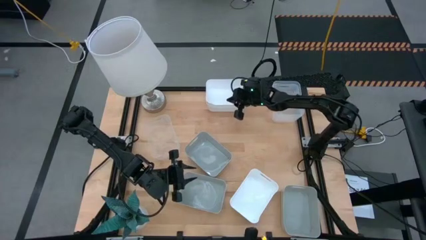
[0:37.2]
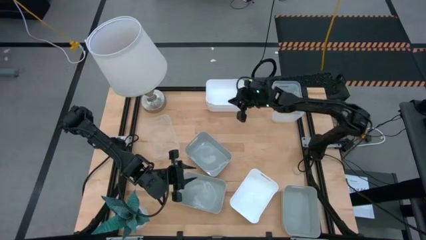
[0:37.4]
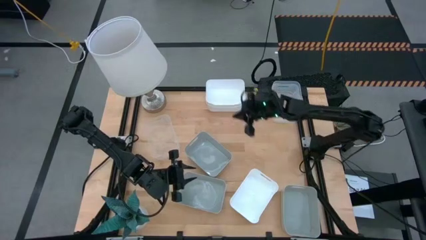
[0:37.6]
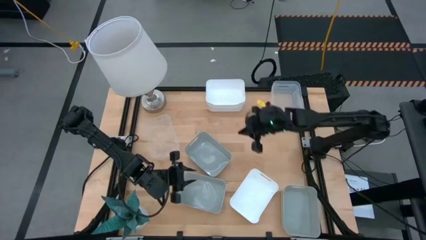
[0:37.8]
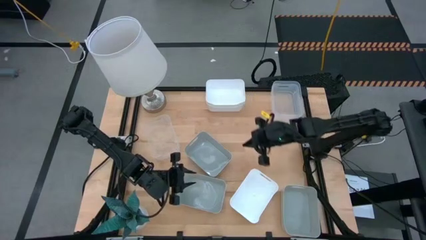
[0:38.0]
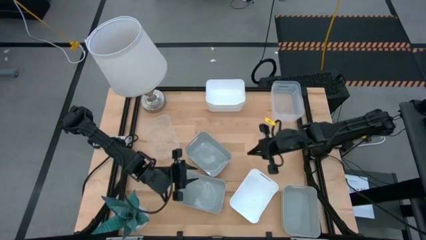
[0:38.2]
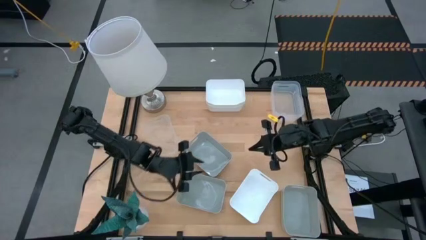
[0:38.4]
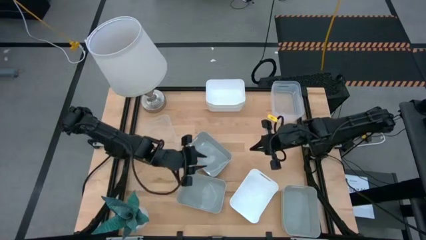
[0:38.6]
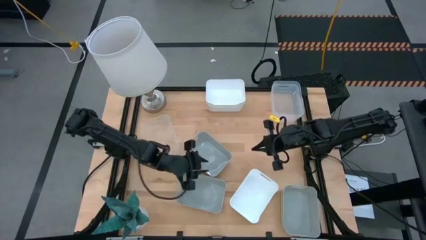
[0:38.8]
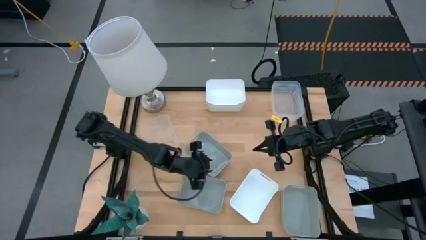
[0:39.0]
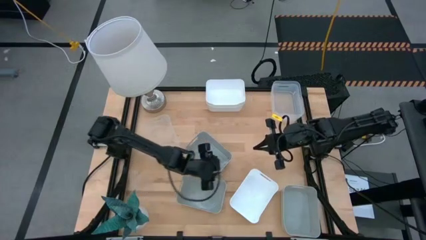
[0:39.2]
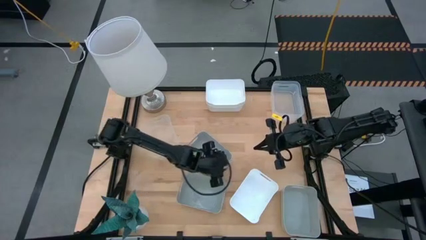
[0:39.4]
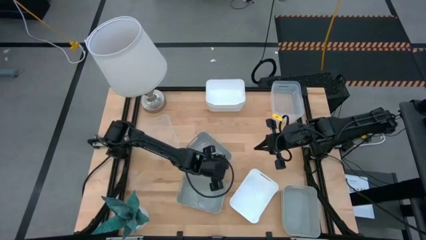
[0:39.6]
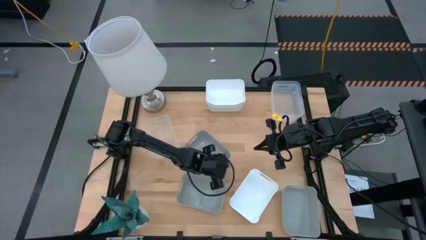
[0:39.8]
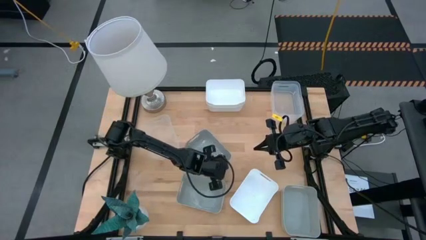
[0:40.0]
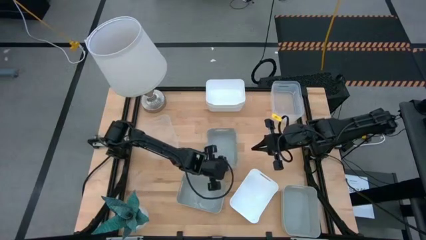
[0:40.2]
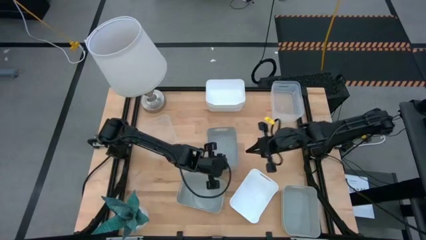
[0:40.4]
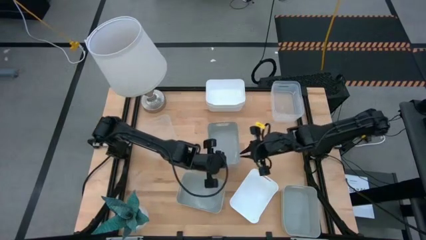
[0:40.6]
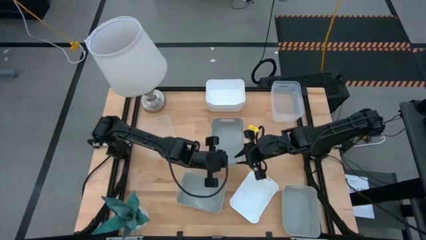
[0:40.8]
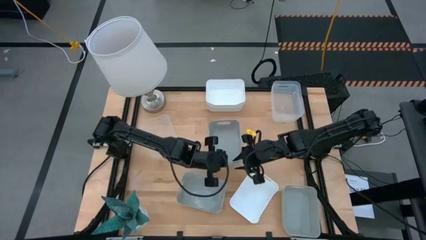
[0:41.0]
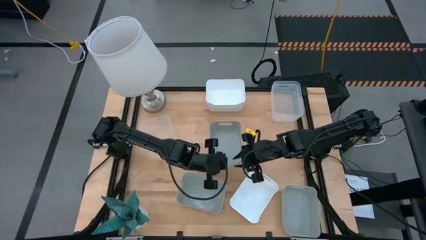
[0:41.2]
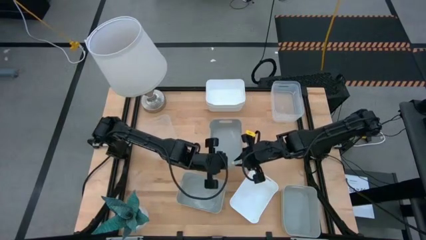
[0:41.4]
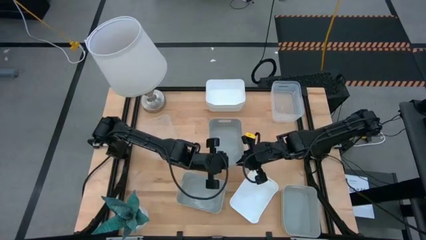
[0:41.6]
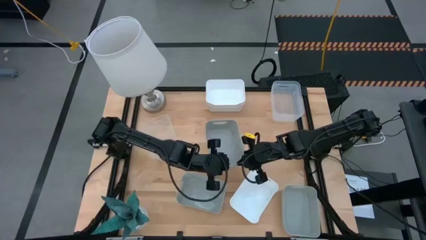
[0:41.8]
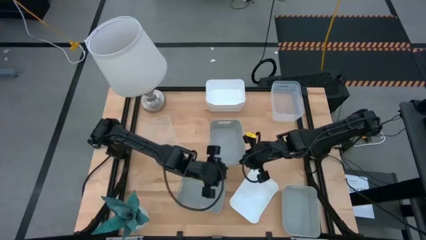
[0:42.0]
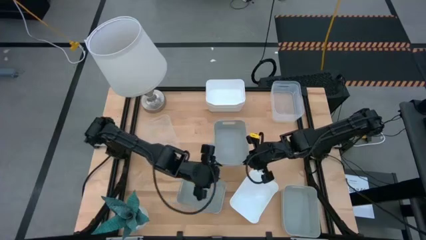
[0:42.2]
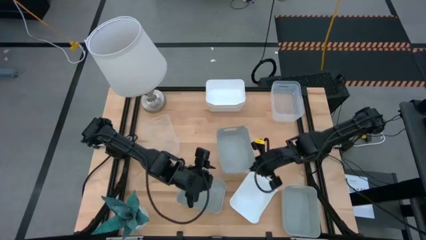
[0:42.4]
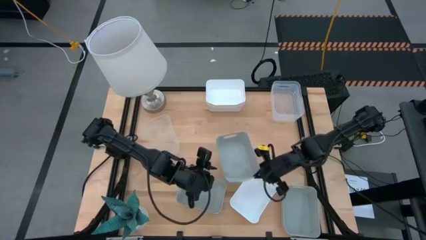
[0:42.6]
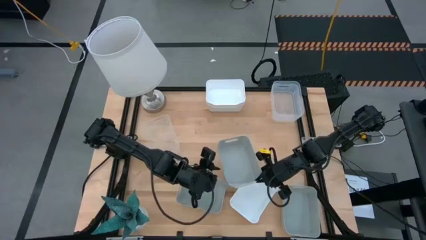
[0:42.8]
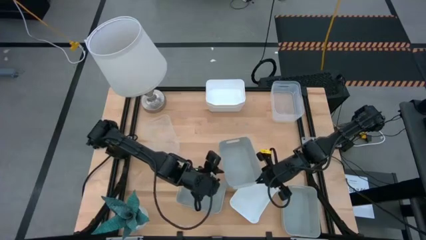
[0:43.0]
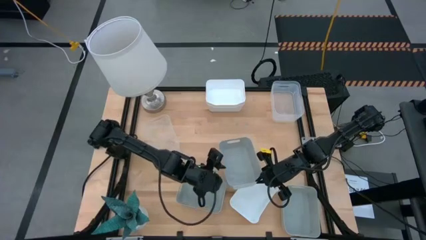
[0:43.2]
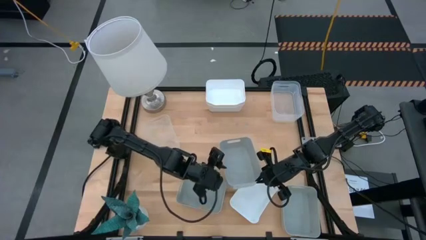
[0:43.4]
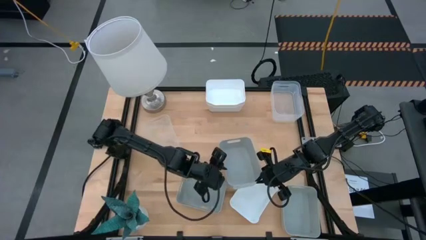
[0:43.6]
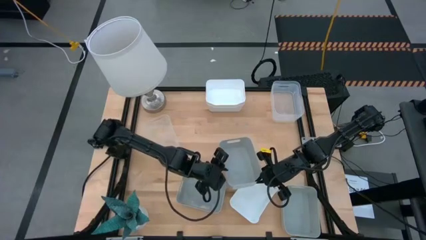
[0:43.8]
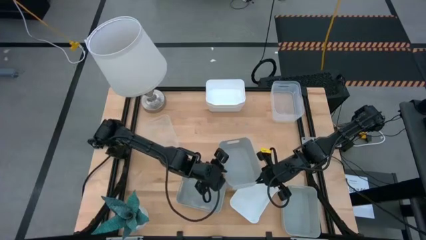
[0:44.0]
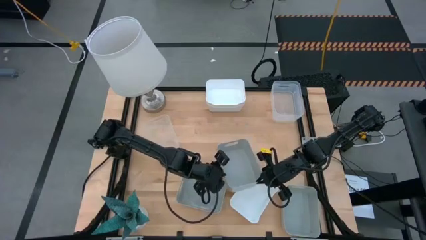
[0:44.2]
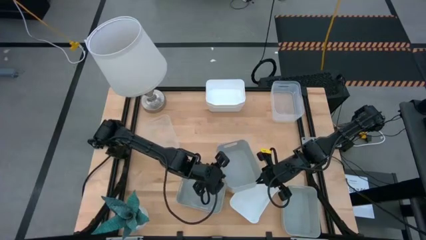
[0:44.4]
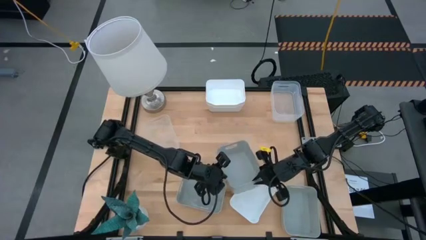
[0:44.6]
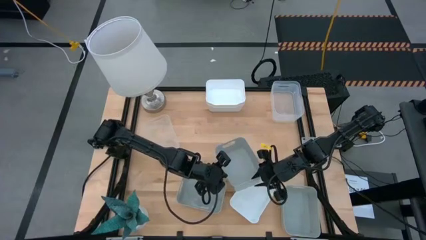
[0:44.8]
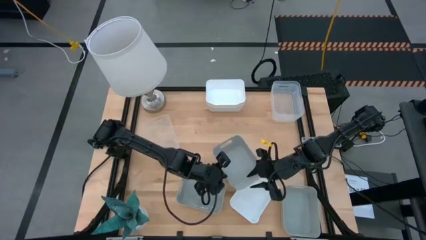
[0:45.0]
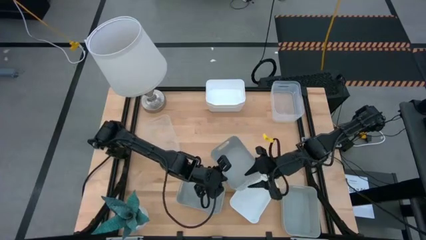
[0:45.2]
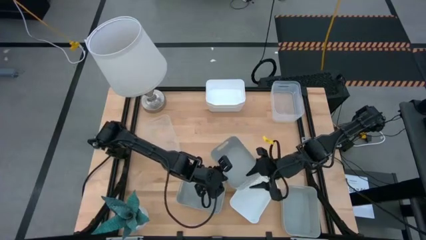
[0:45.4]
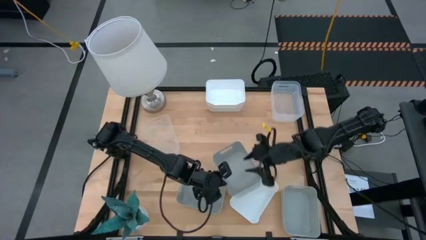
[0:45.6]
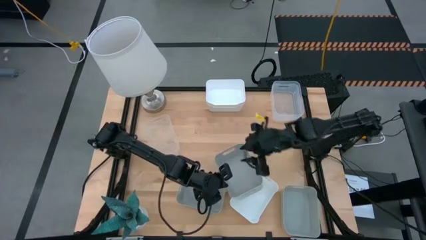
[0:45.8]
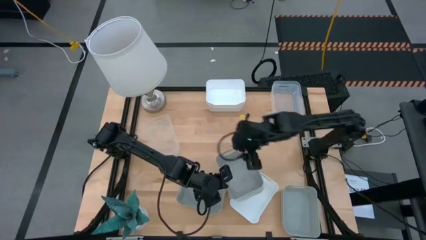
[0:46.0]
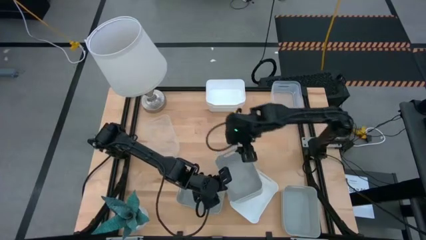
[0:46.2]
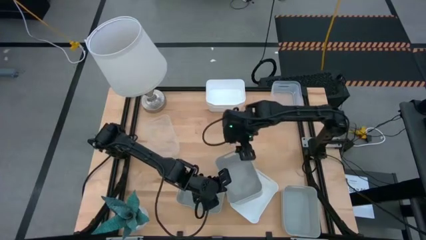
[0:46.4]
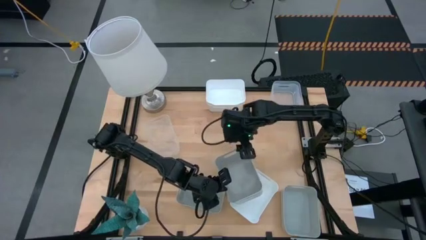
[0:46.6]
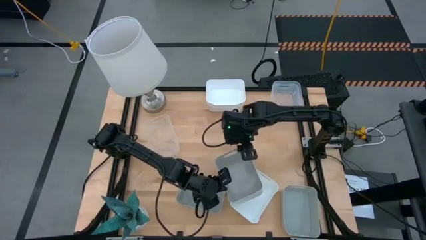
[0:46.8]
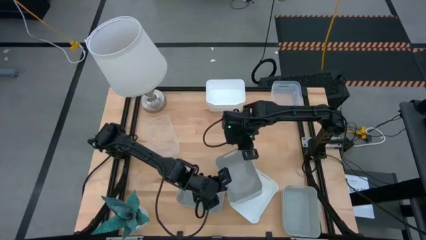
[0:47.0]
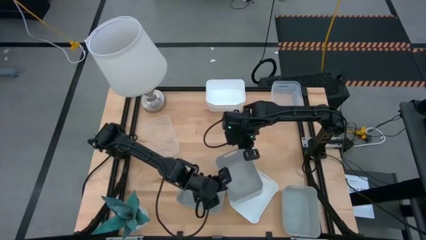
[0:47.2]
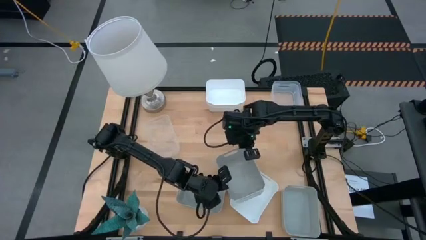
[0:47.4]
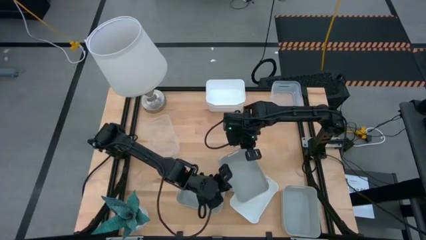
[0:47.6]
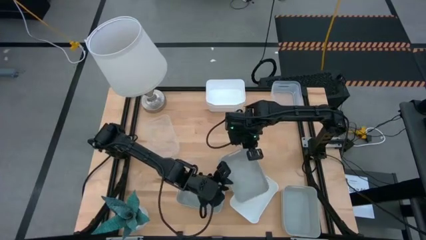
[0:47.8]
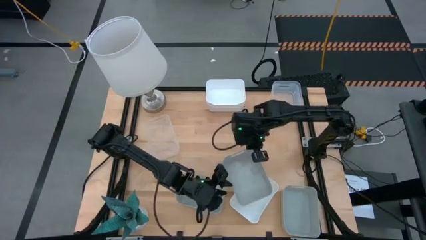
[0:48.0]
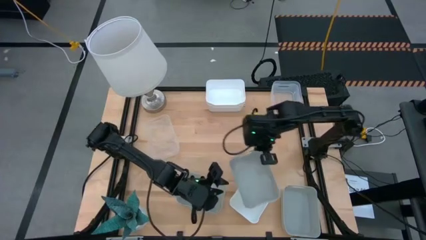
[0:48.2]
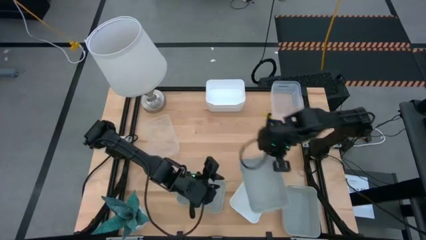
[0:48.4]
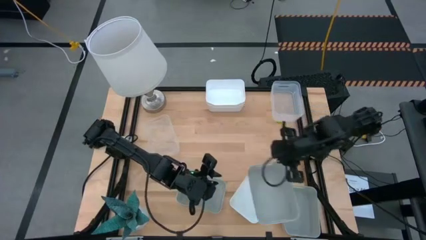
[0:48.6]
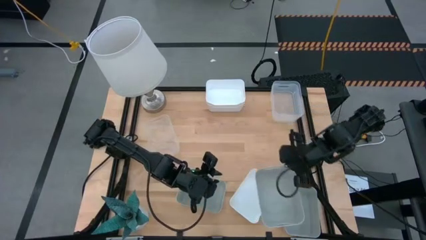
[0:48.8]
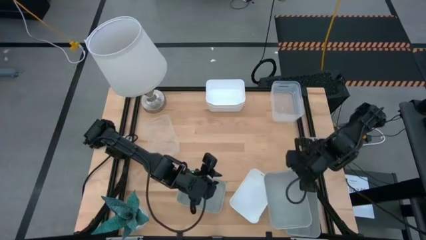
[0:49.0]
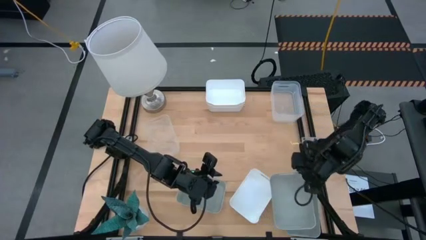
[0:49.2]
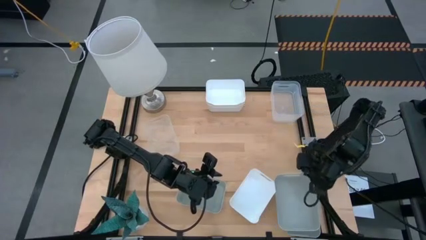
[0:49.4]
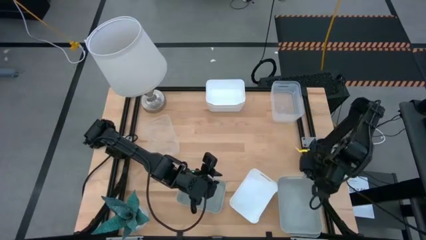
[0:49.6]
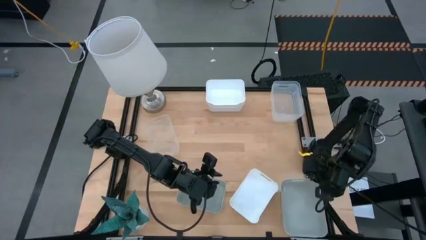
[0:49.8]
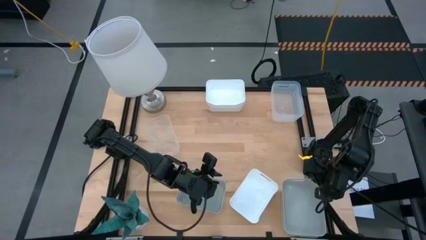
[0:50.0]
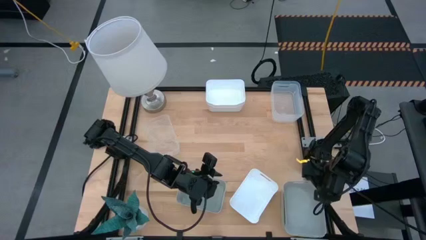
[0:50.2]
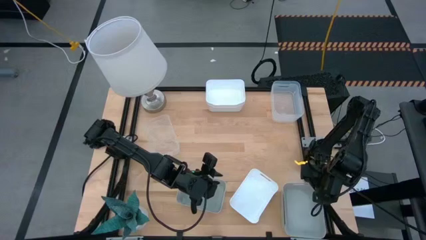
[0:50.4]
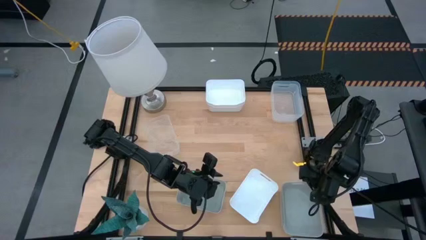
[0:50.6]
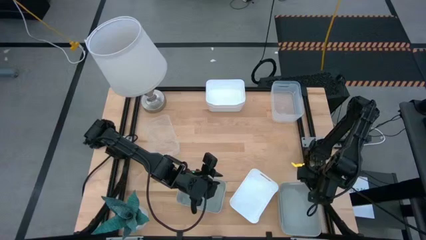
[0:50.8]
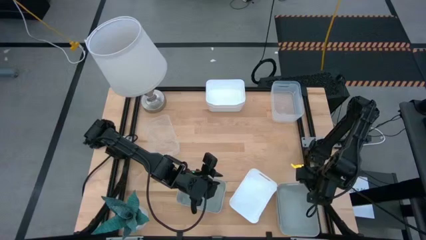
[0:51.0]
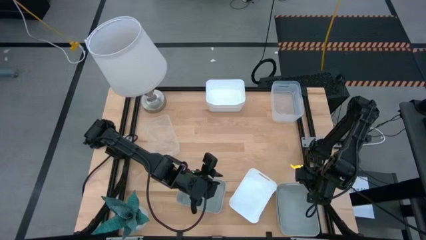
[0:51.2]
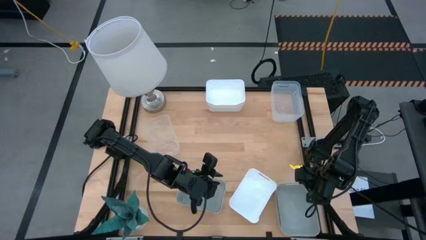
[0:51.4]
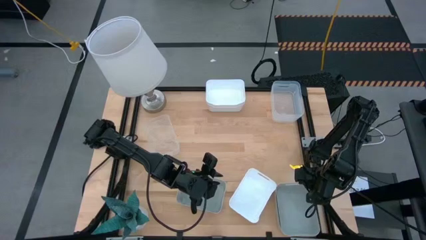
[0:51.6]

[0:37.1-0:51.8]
Stack the top gray bin on the bottom right gray bin
